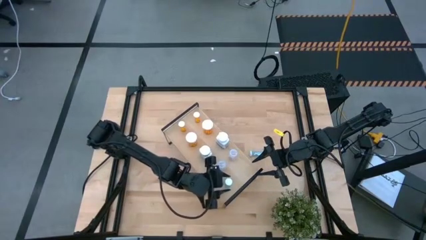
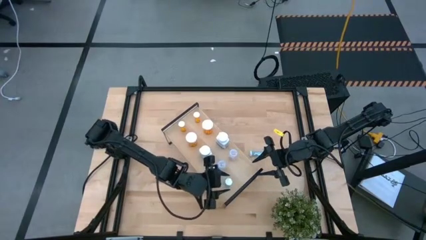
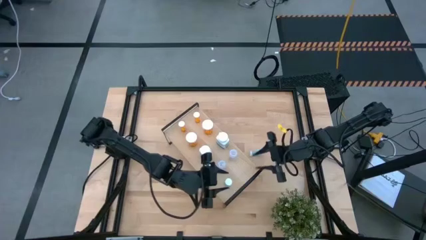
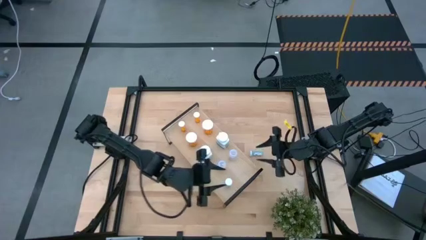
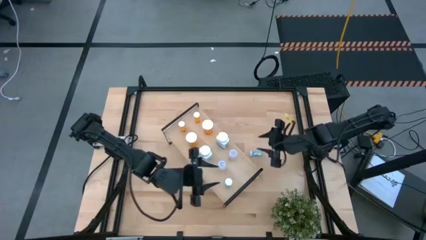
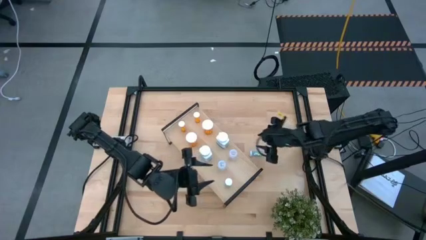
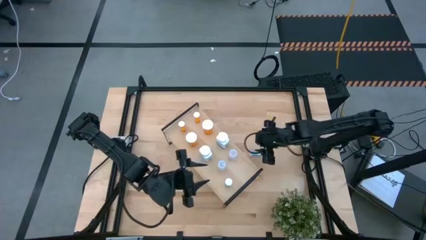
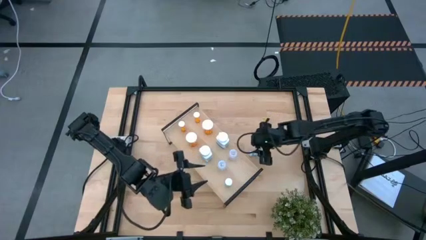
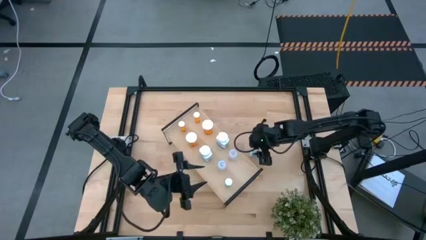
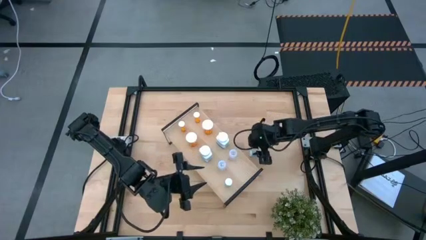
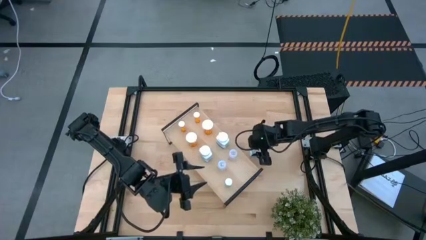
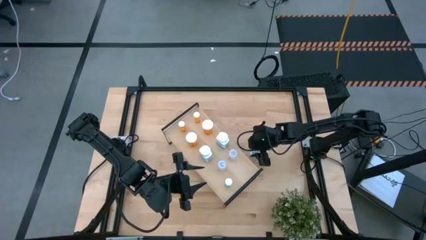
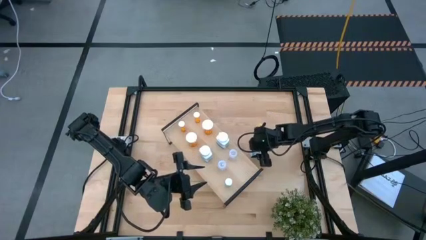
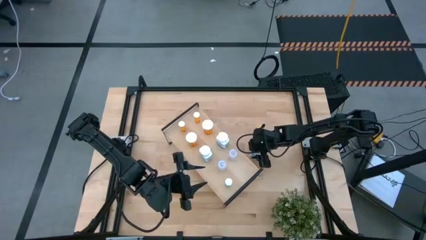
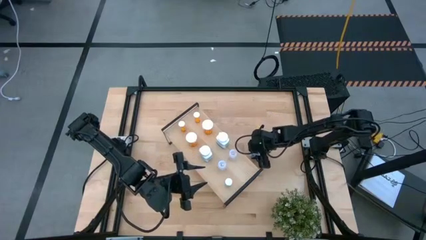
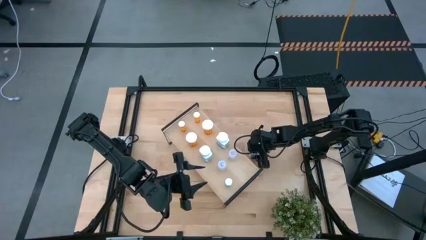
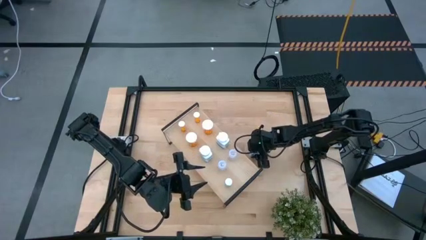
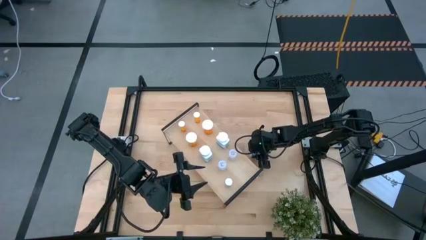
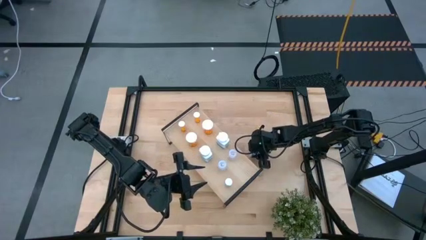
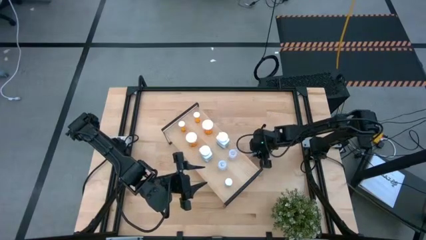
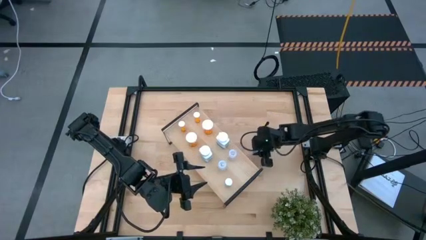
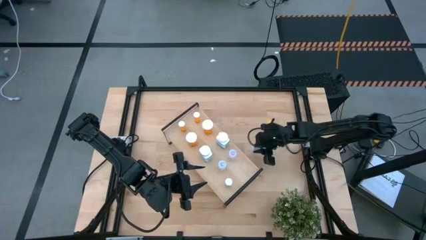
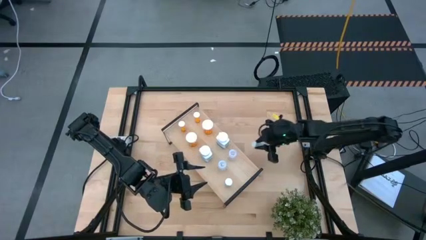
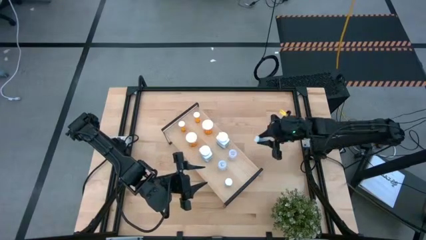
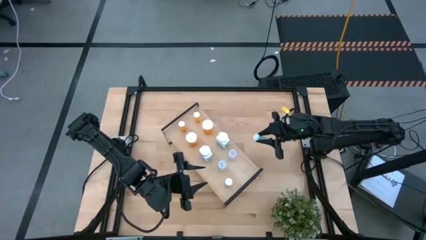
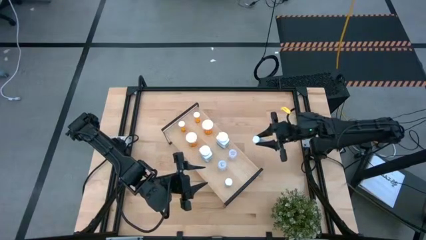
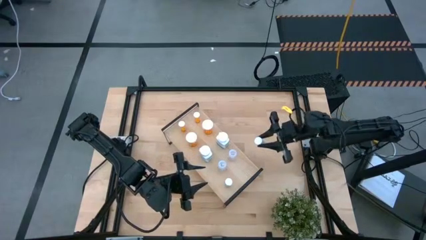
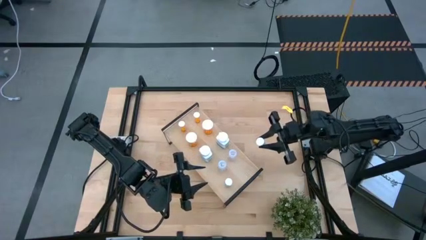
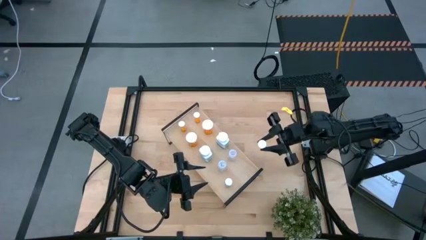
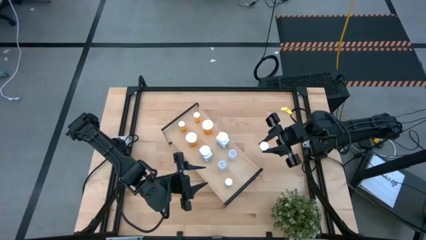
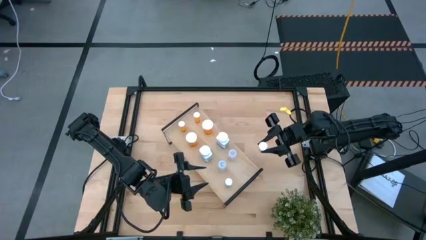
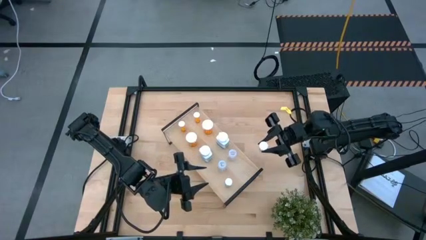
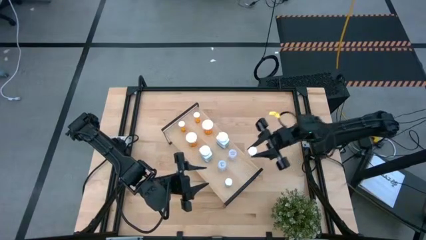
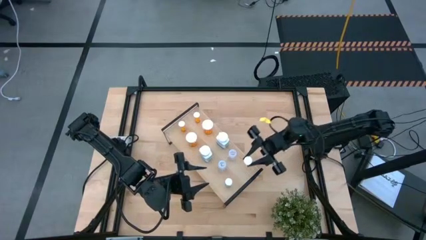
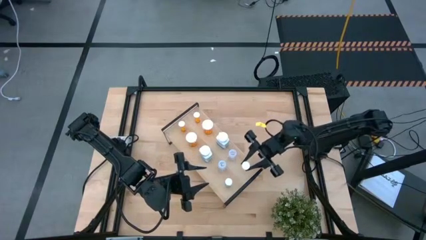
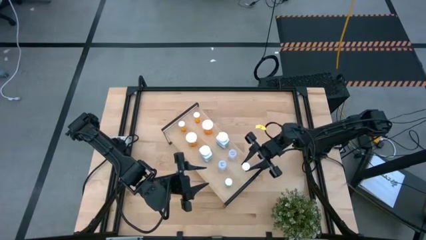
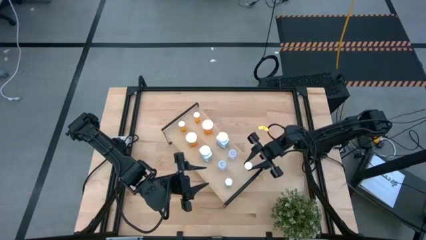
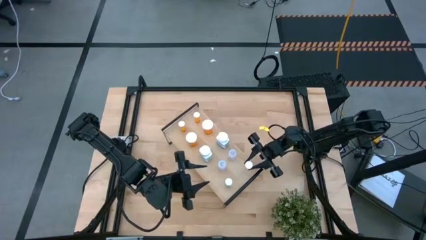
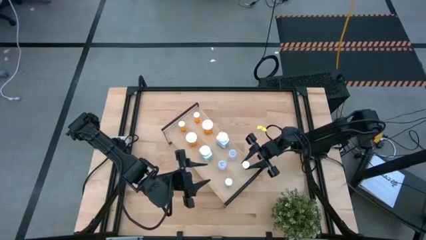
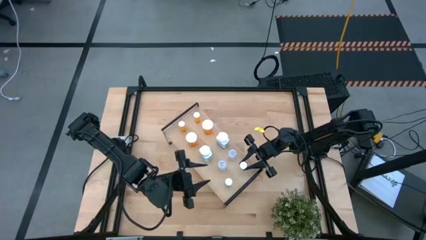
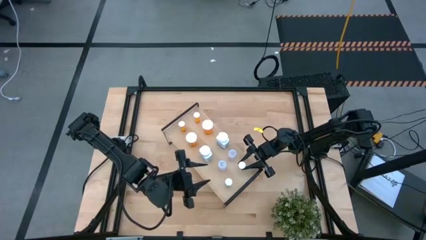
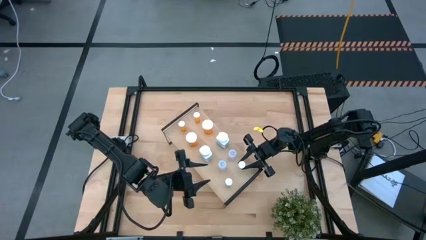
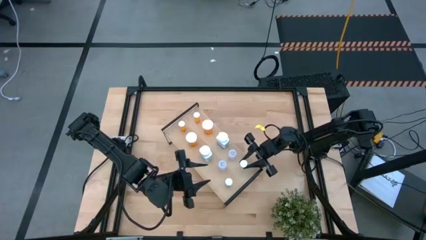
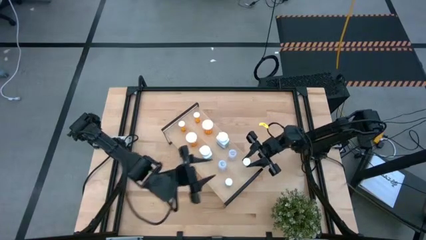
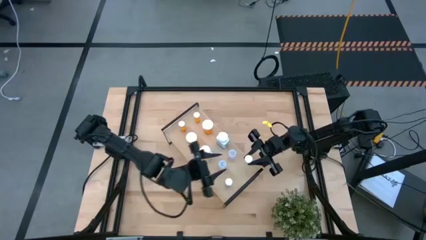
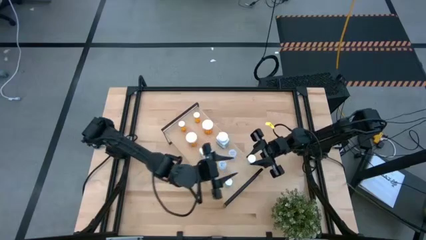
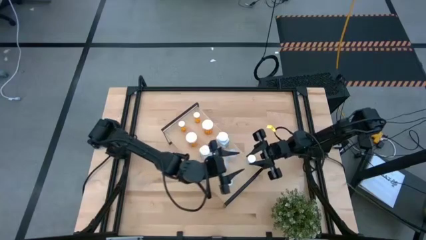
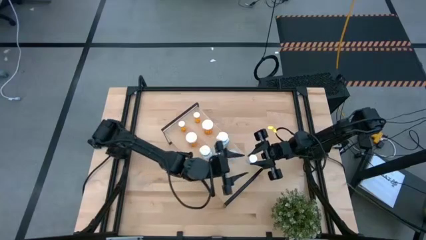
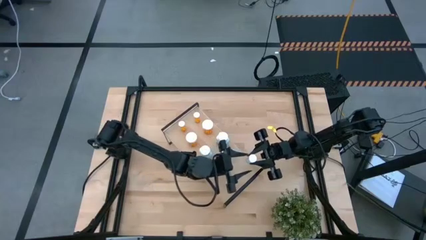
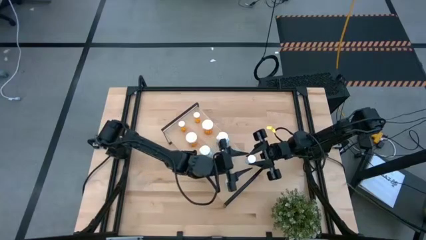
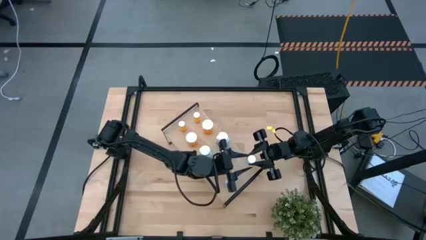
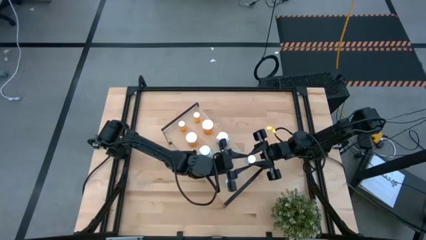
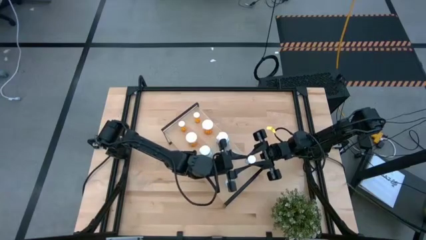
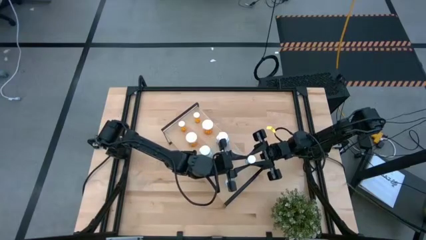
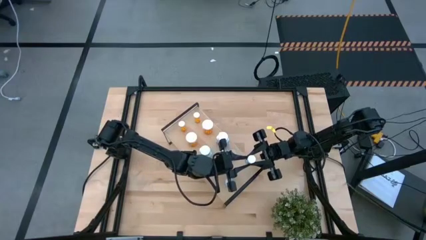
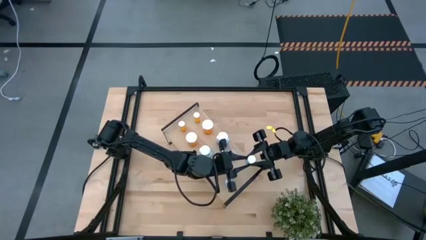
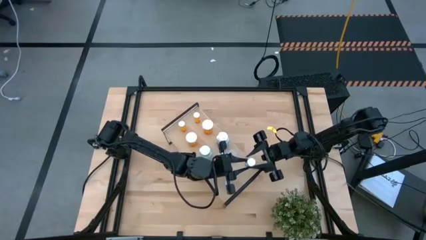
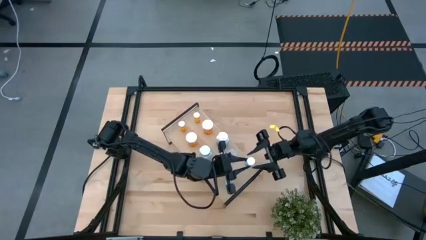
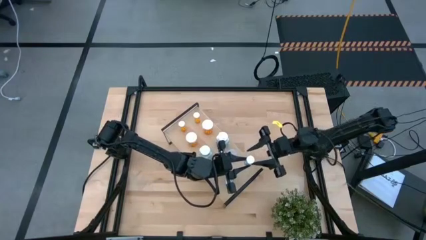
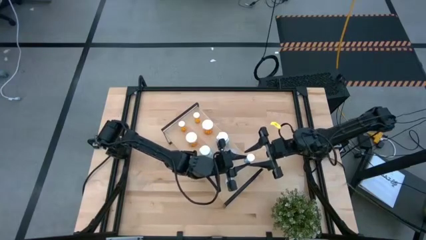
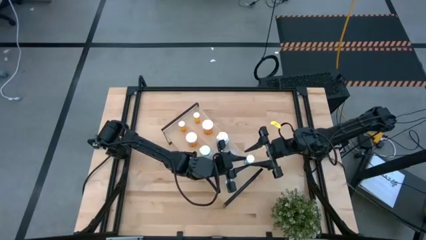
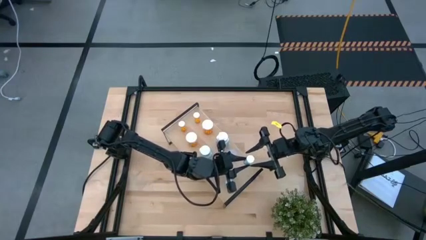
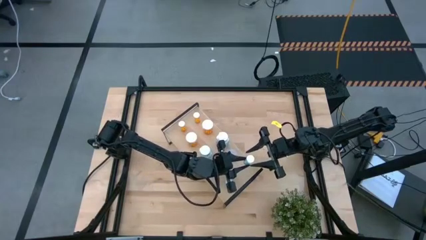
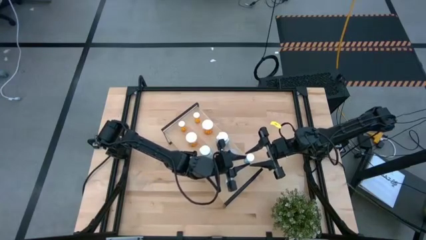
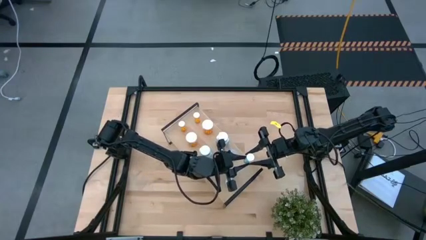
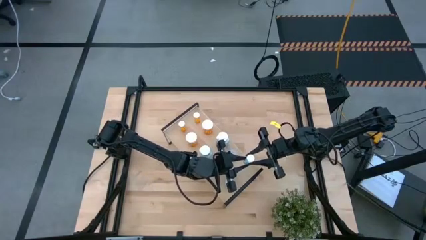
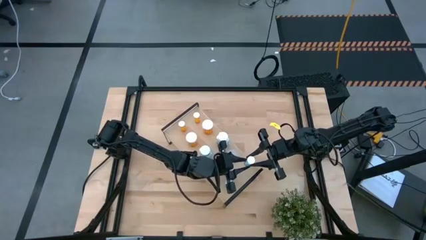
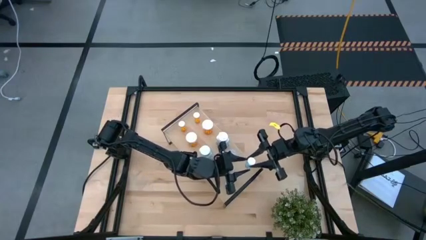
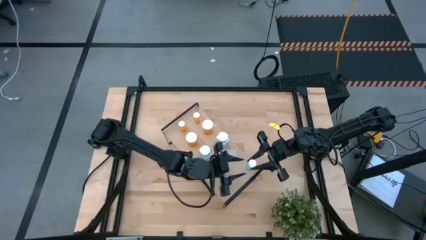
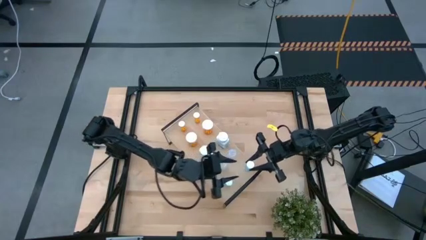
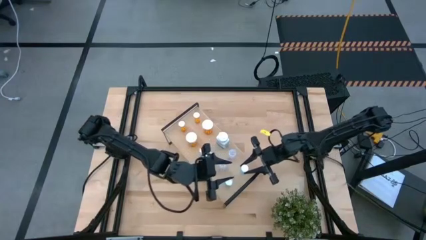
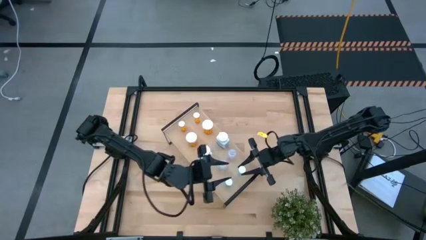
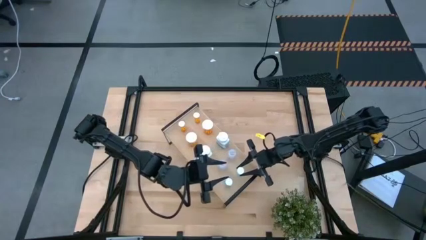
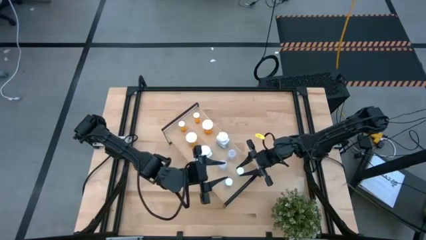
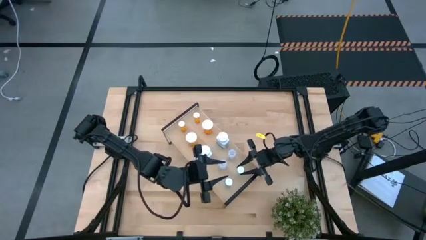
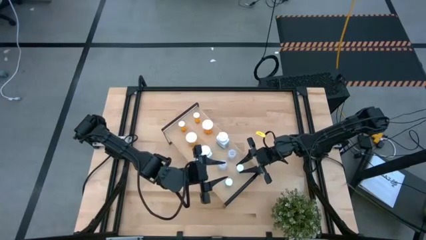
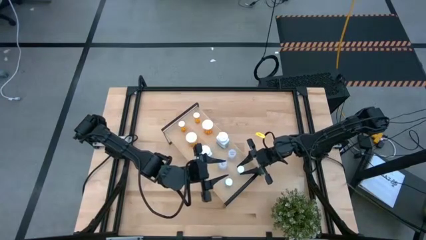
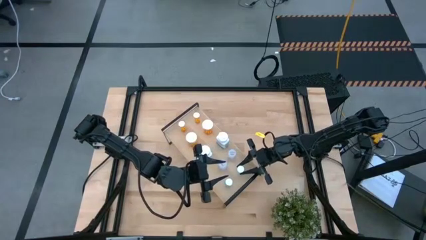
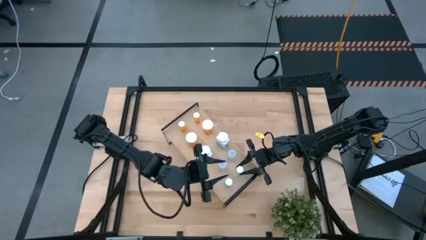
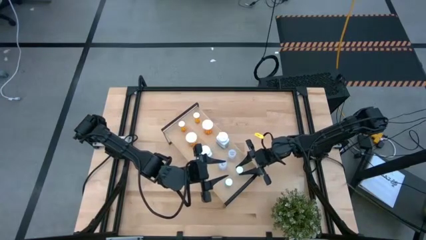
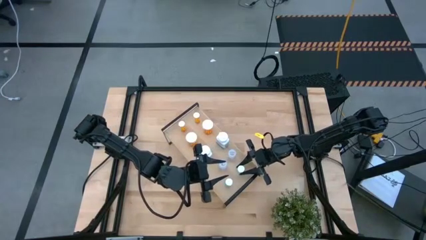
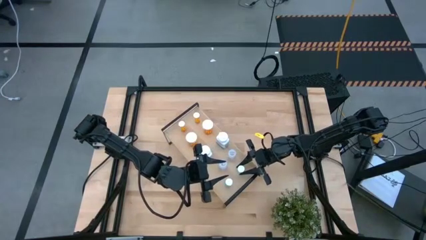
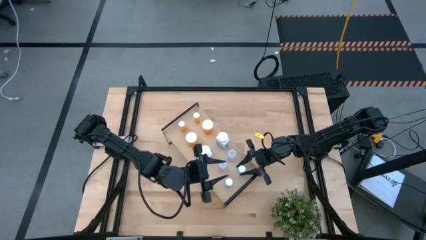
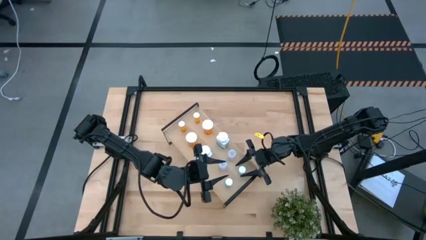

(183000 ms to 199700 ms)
Task: Pick and place medicine bottles onto shelf by color
Put the blue pill bottle on the shelf aligned with the blue pill bottle
